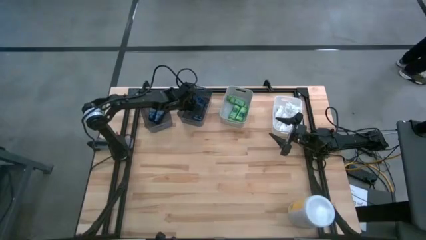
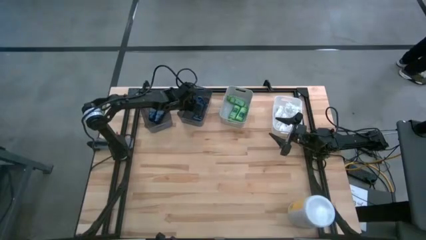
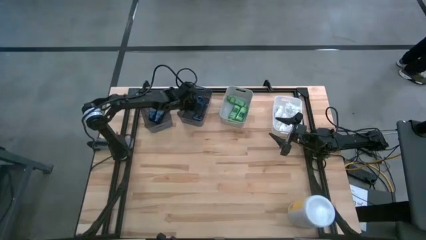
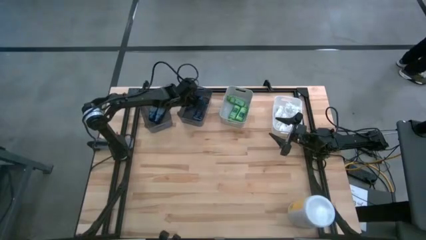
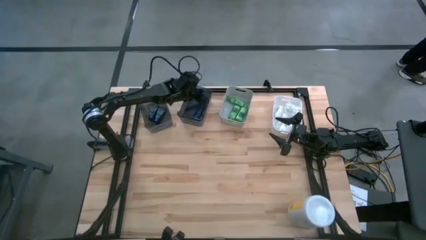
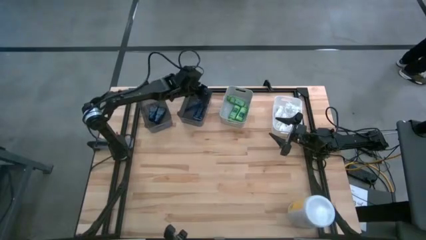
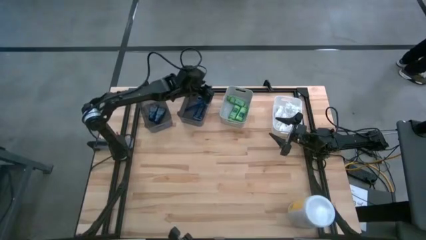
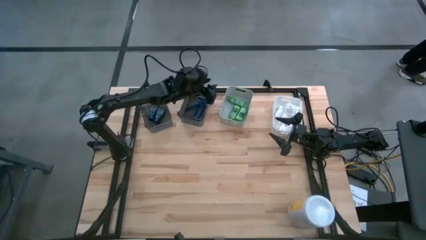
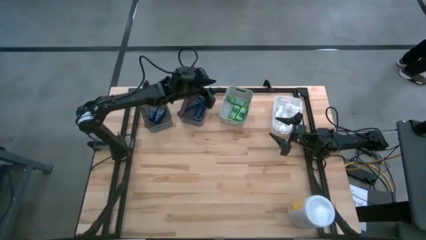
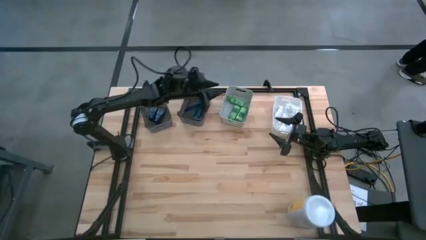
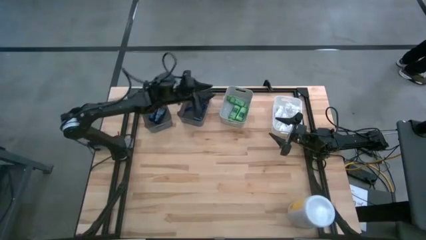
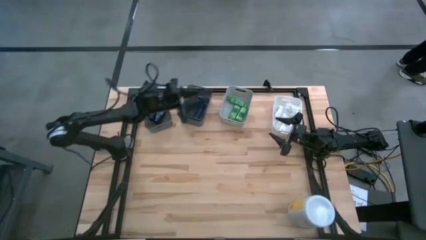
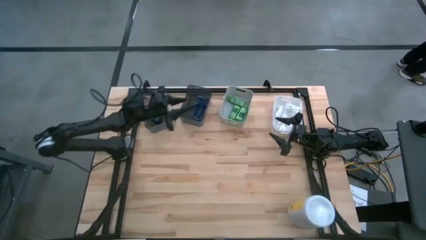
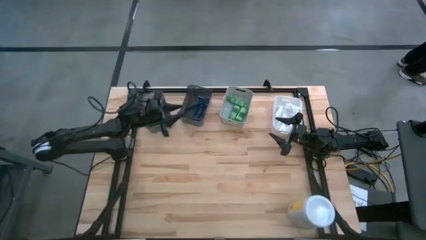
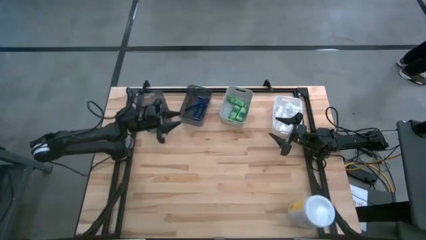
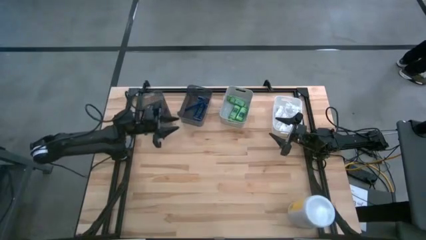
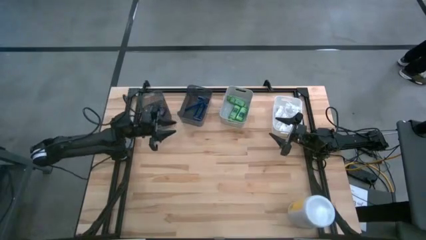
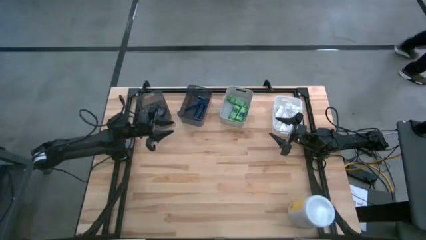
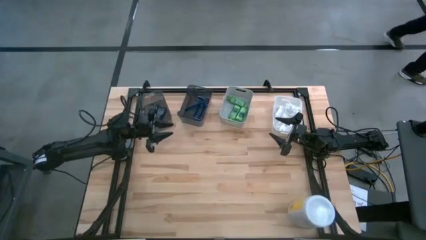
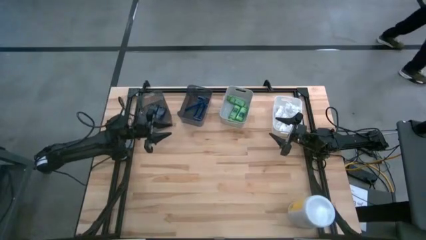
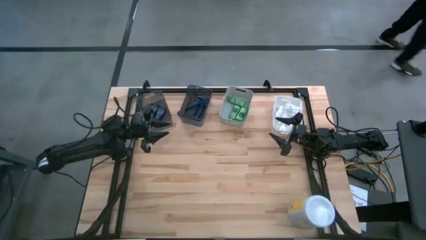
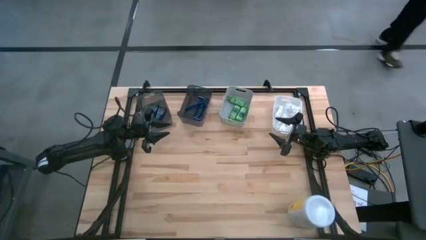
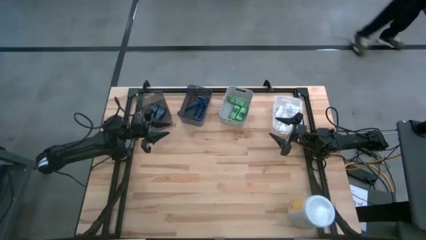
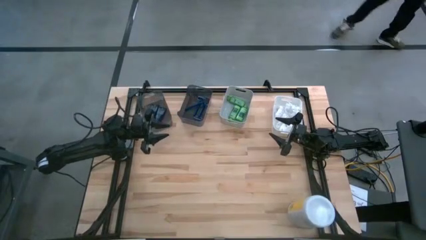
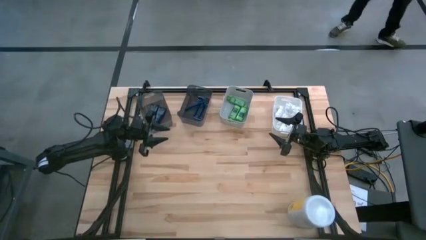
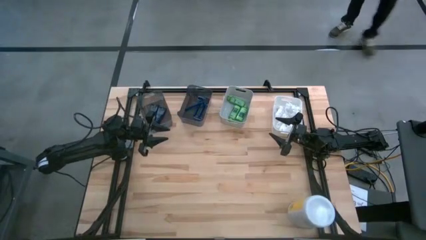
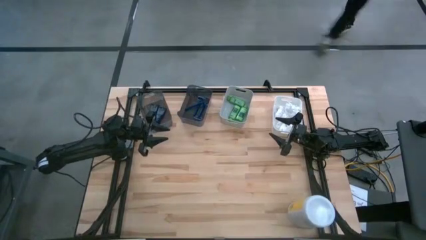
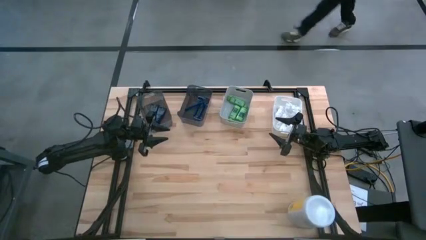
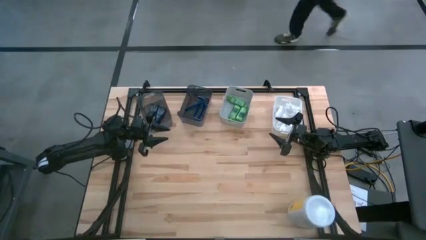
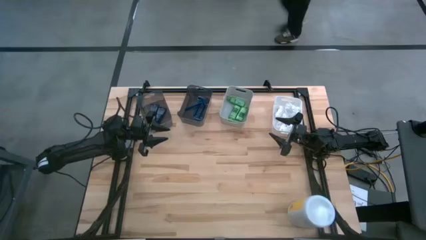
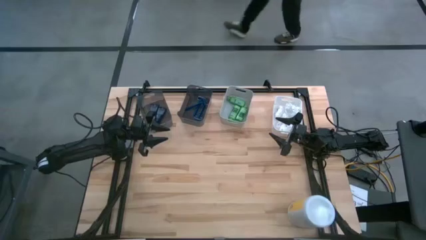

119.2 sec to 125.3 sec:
Task: Pick & Place Travel size toiletries
Return to Home Position

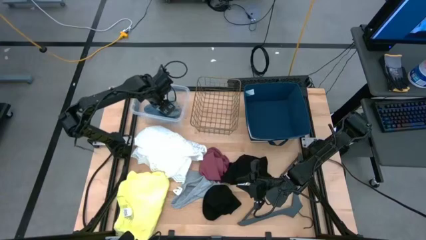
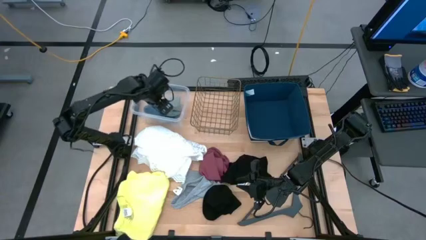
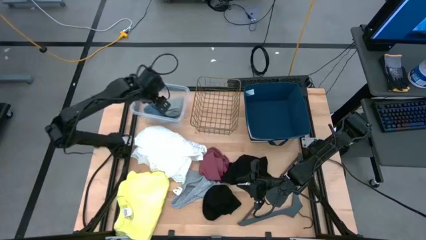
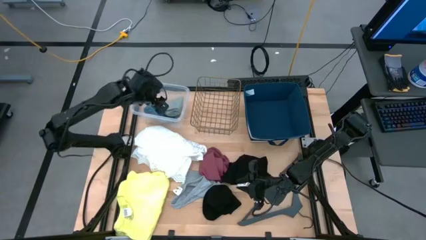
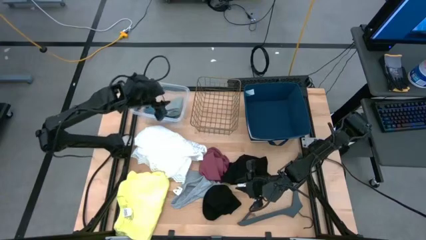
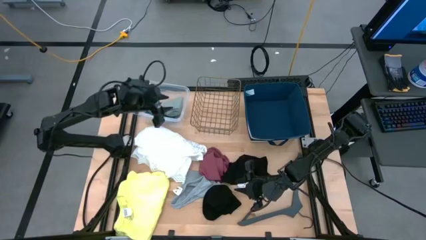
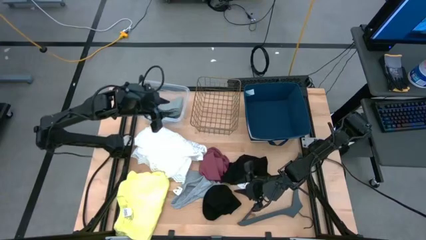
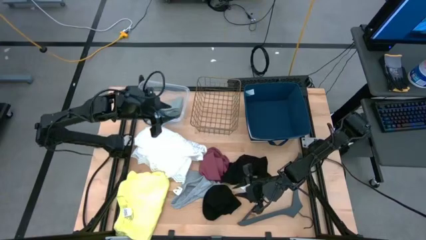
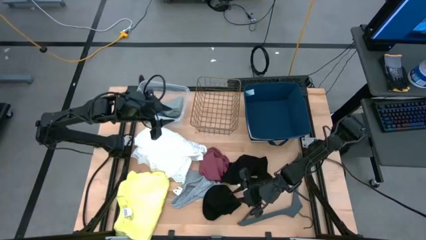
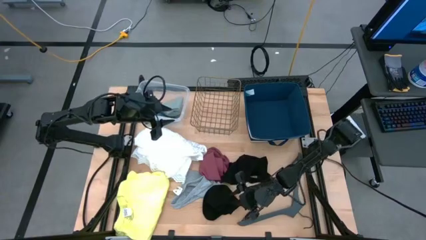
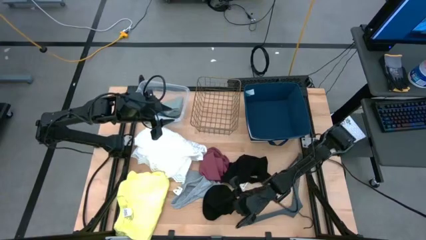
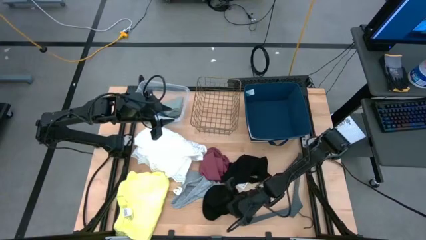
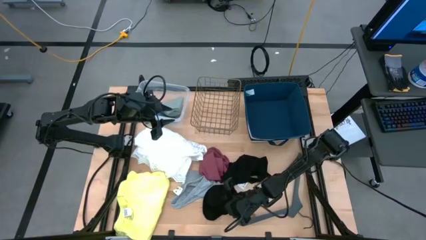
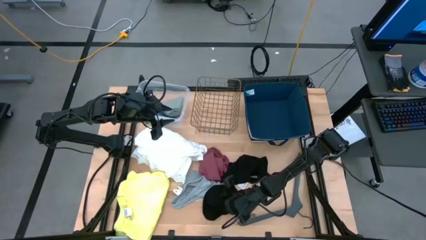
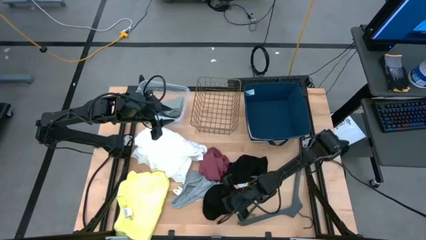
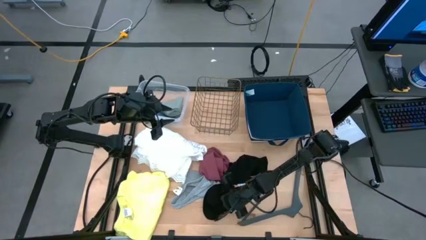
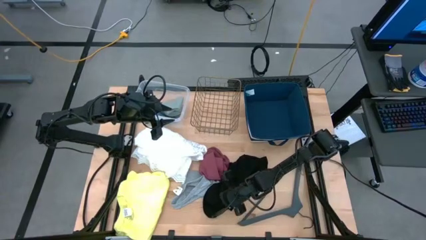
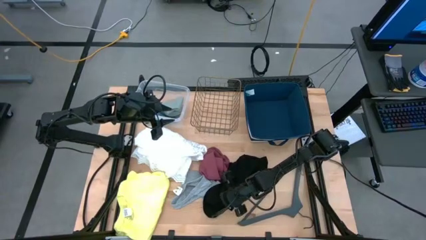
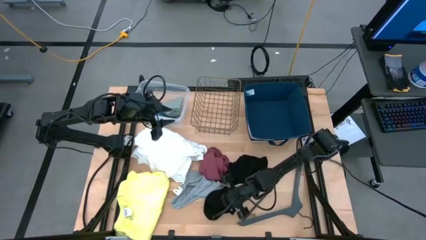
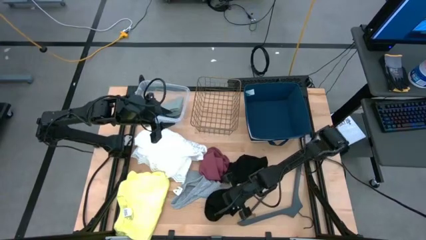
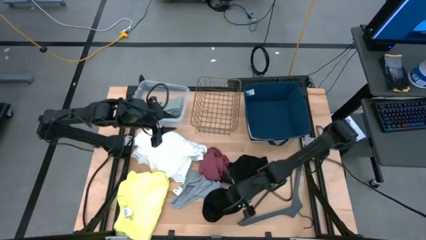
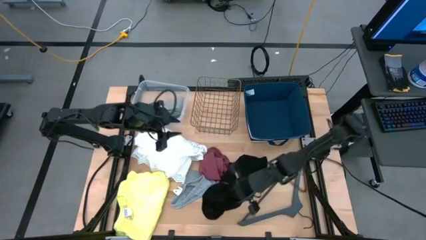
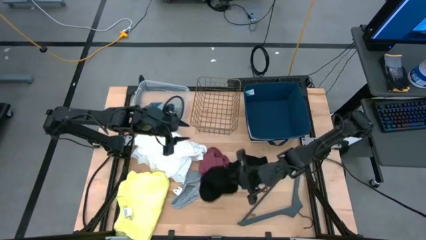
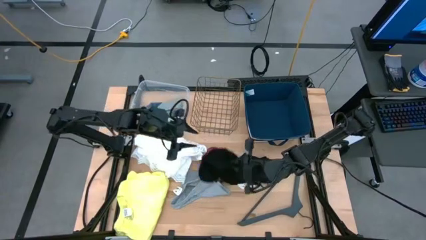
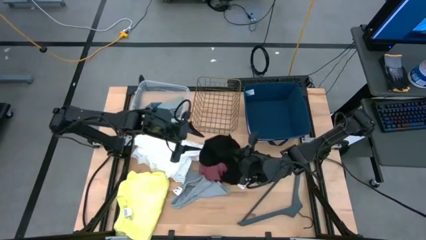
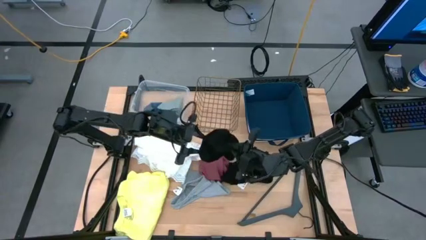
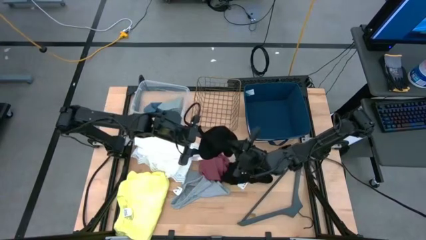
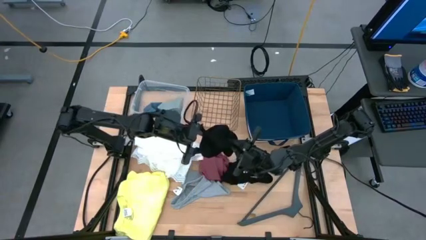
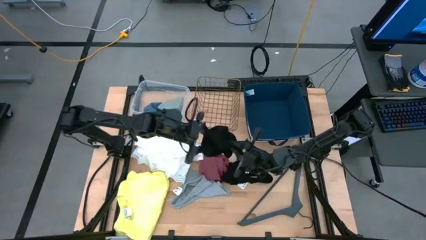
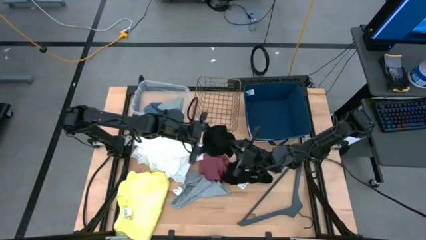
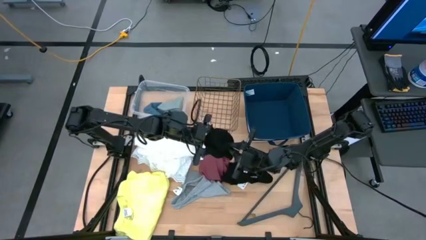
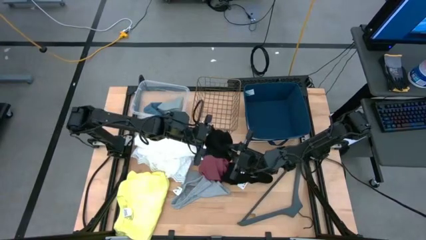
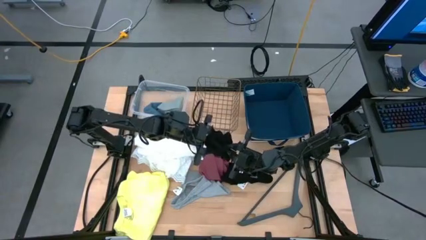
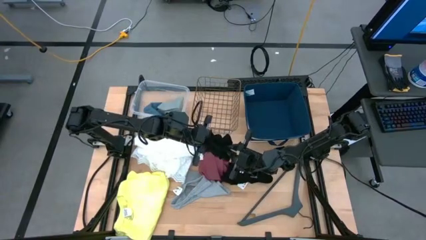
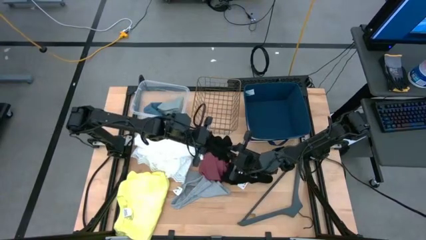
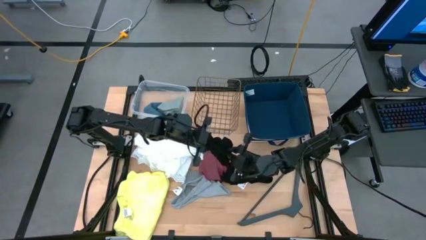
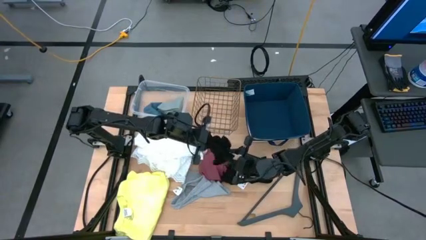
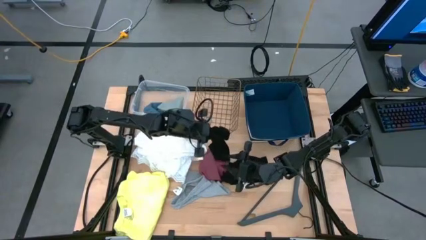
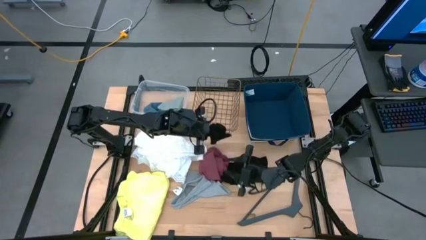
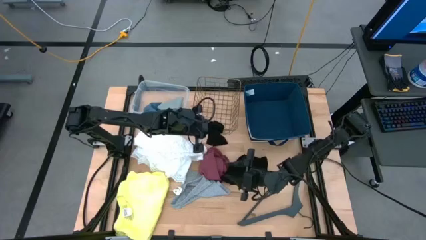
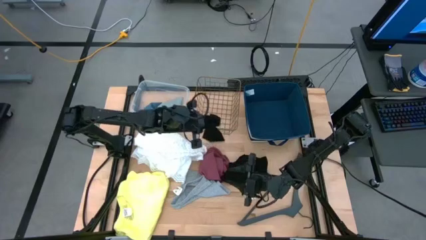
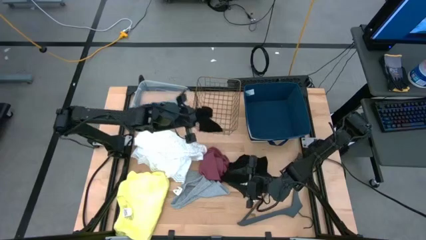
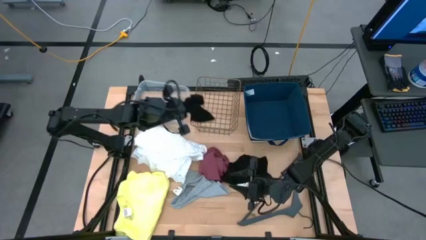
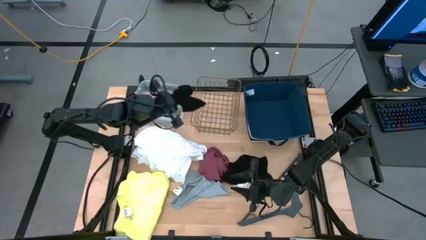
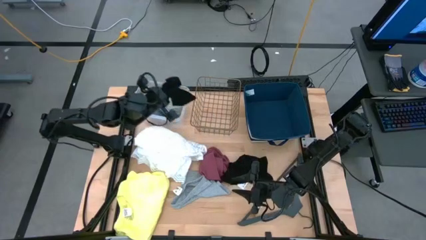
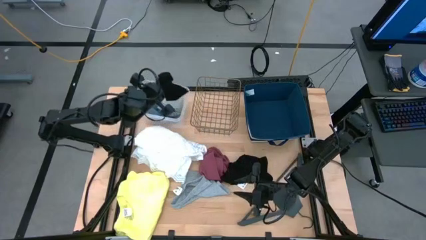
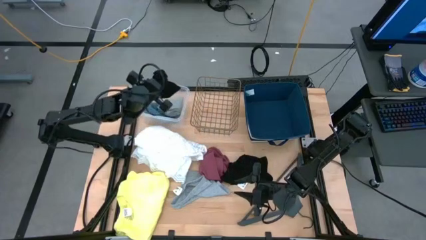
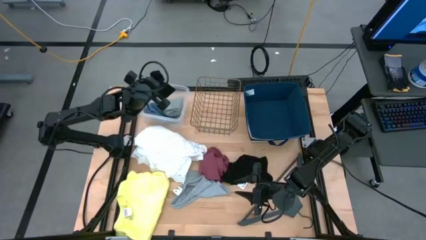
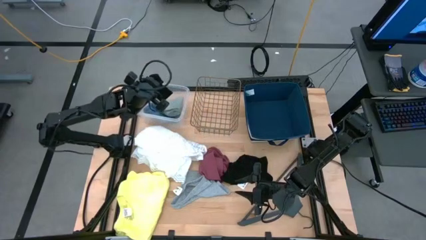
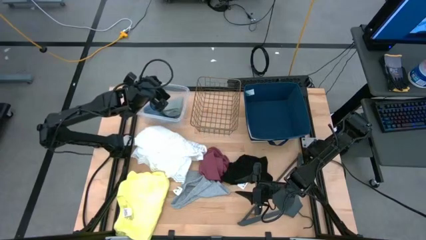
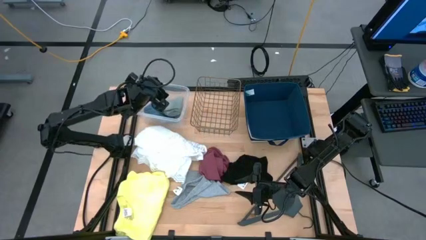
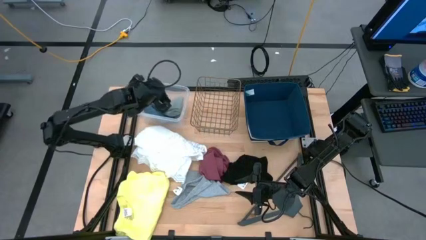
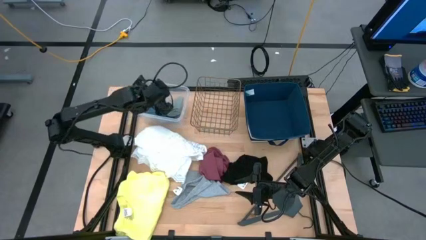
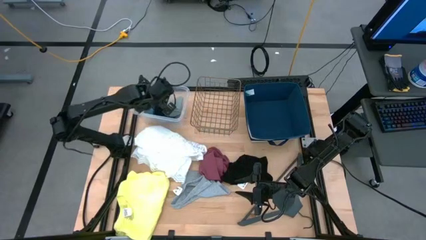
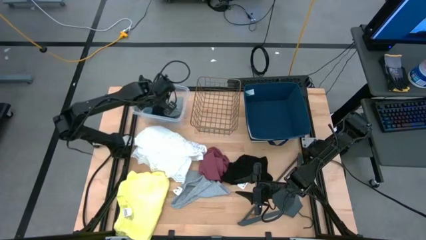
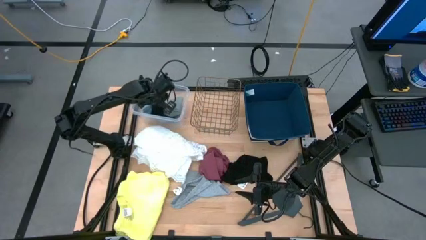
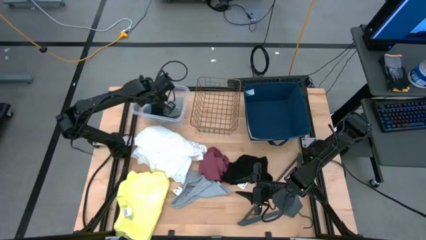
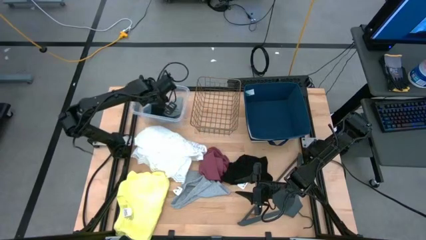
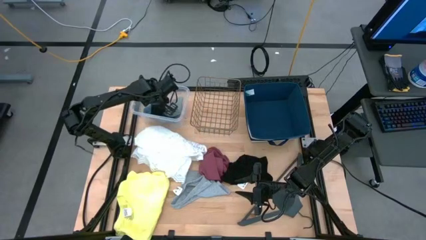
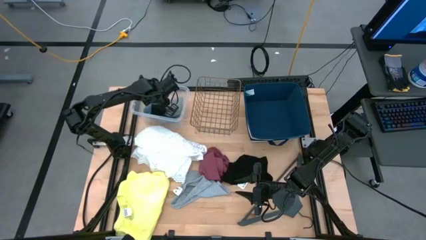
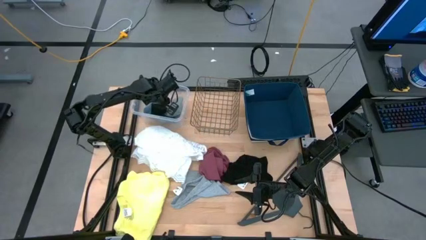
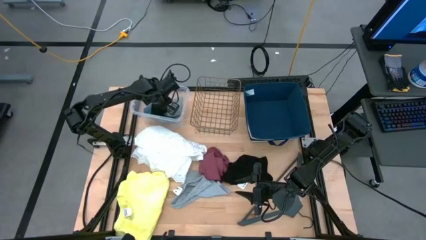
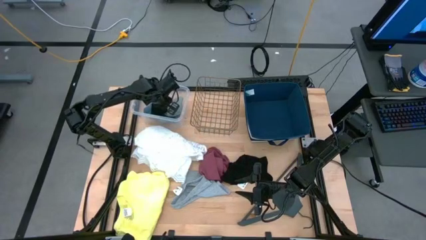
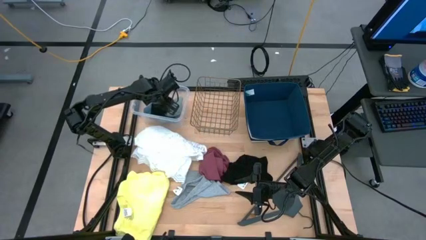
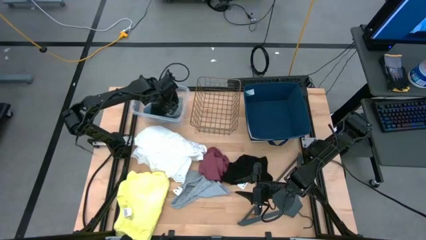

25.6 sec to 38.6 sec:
Task: Pick & Place Cloths
Put the black sock into the transparent bin
